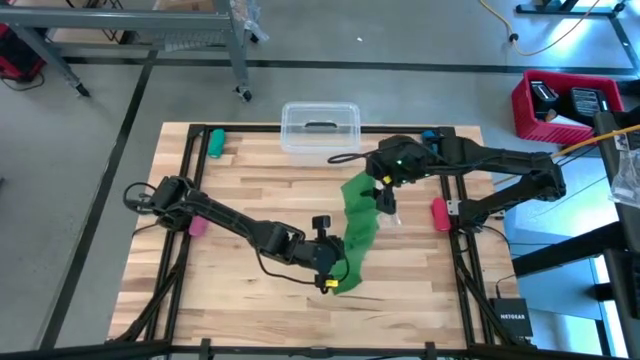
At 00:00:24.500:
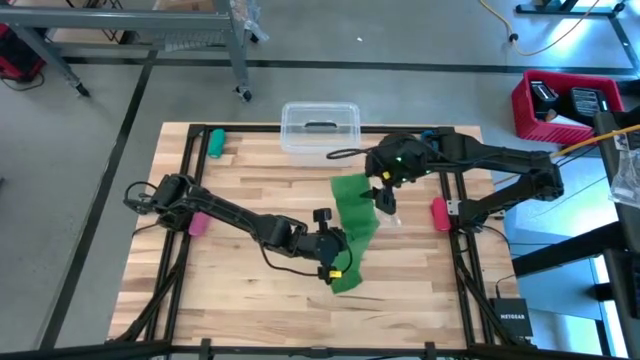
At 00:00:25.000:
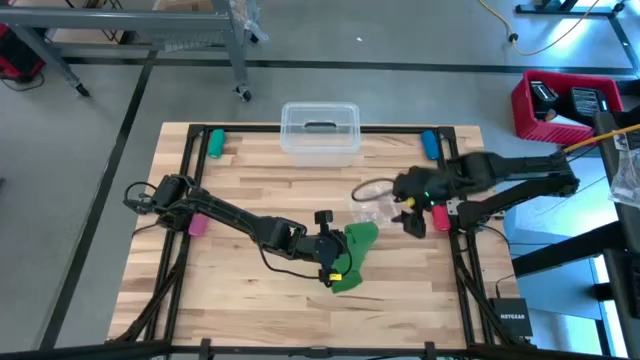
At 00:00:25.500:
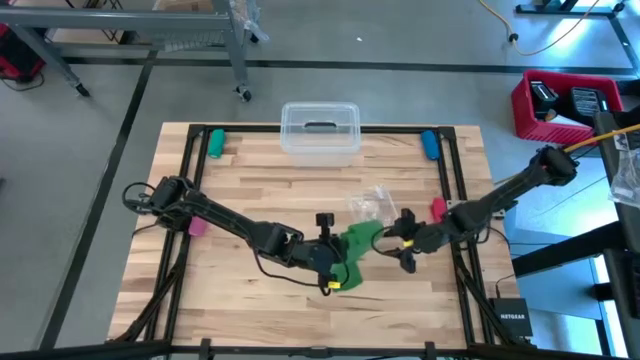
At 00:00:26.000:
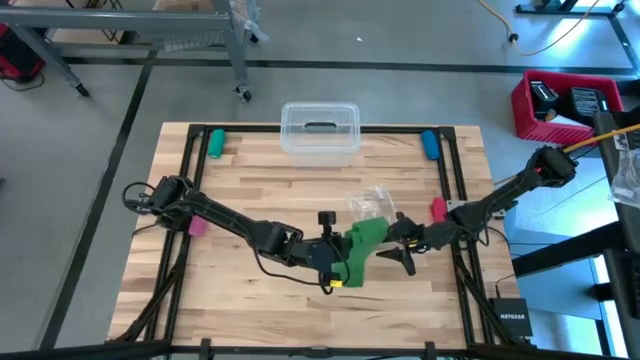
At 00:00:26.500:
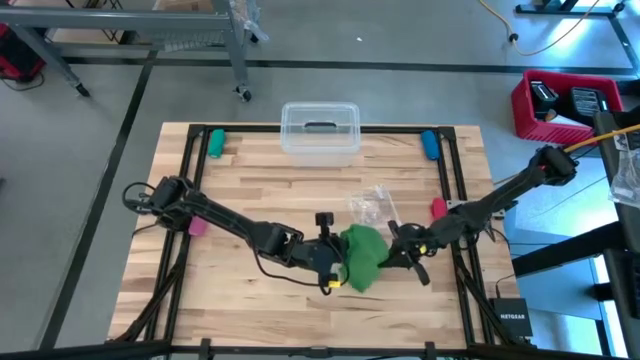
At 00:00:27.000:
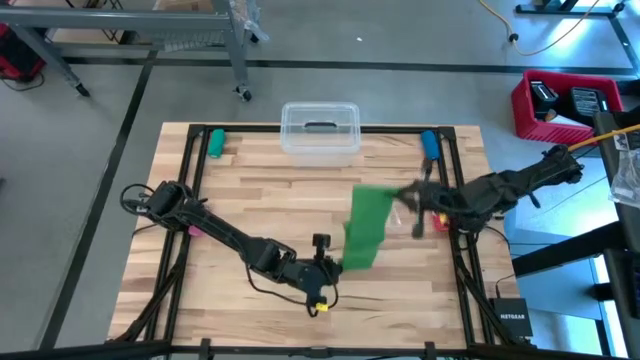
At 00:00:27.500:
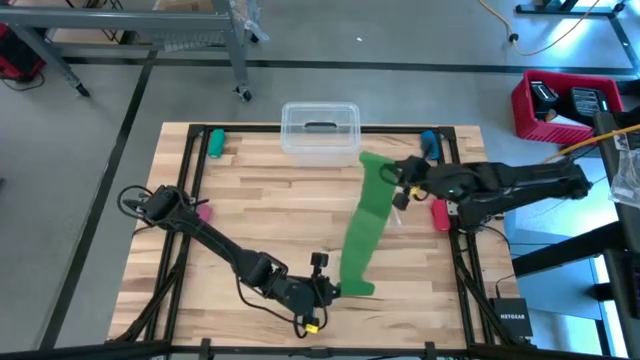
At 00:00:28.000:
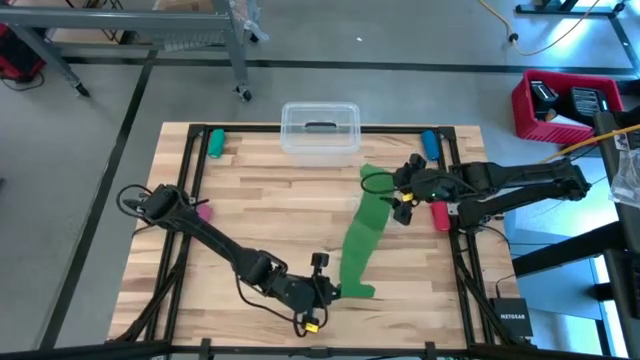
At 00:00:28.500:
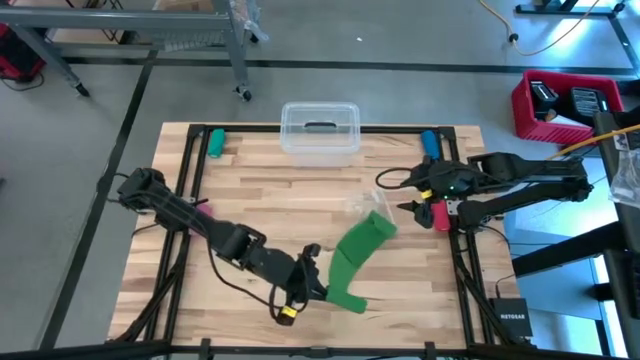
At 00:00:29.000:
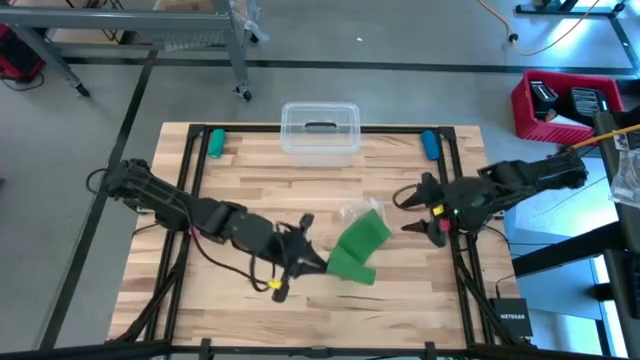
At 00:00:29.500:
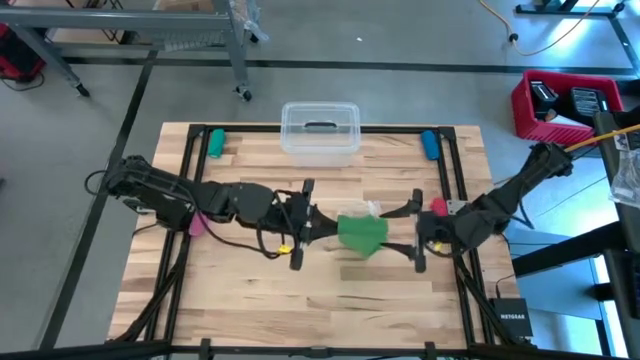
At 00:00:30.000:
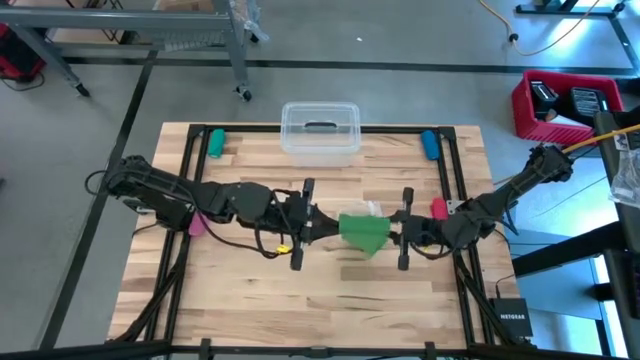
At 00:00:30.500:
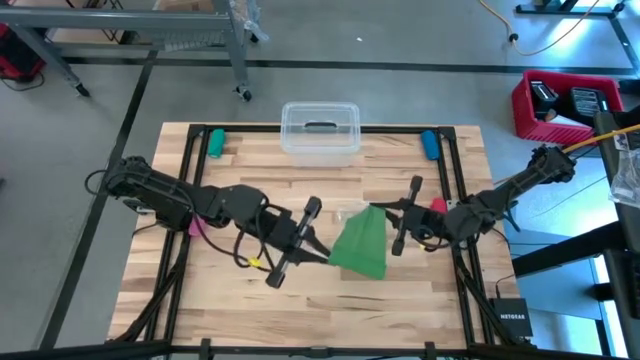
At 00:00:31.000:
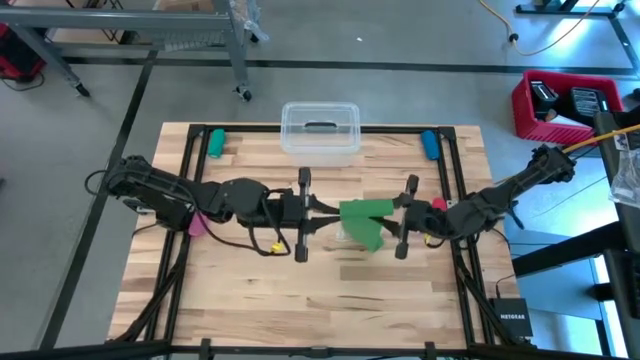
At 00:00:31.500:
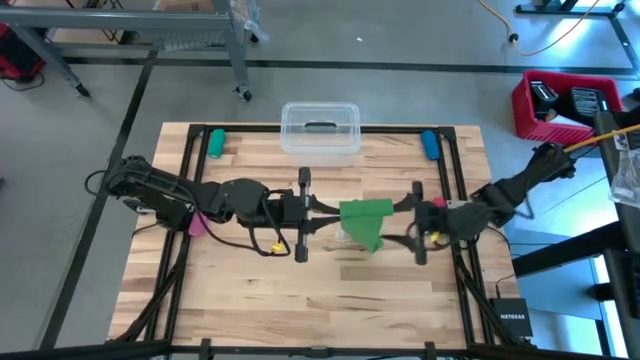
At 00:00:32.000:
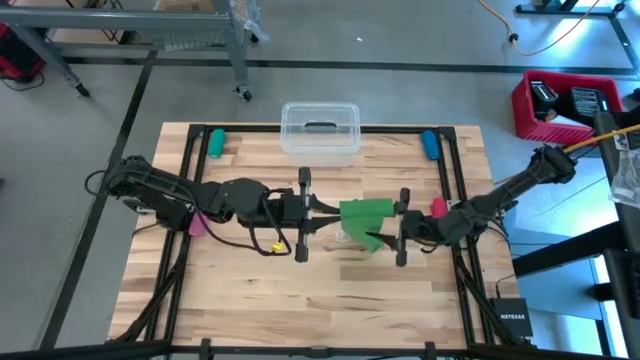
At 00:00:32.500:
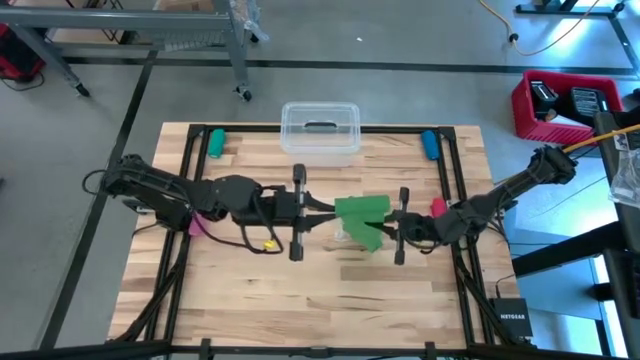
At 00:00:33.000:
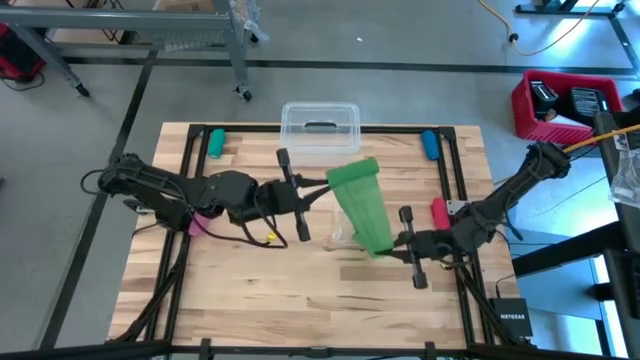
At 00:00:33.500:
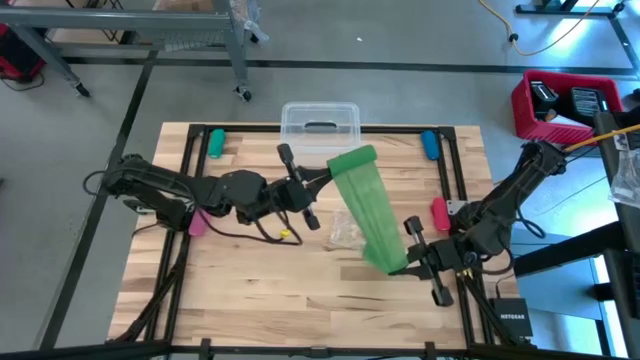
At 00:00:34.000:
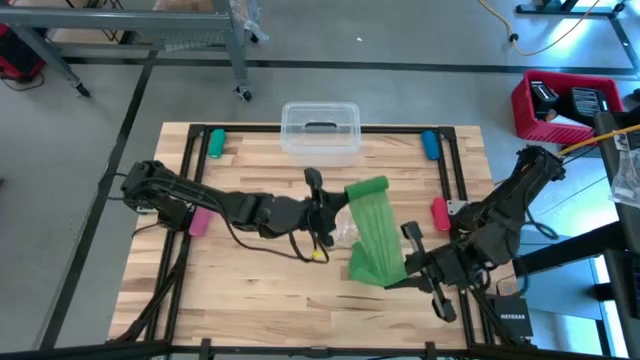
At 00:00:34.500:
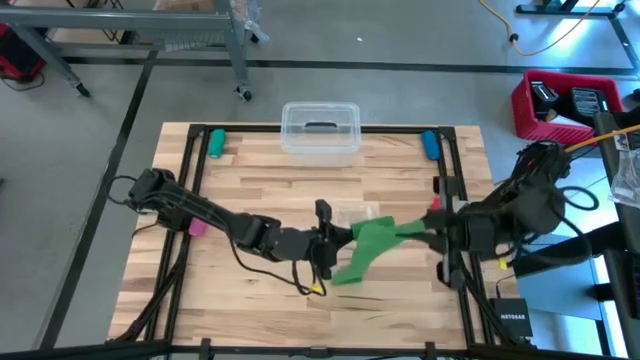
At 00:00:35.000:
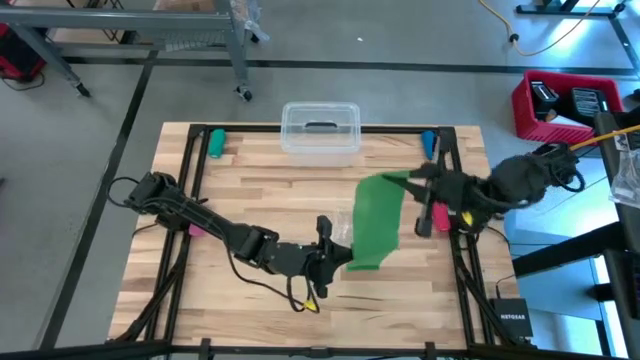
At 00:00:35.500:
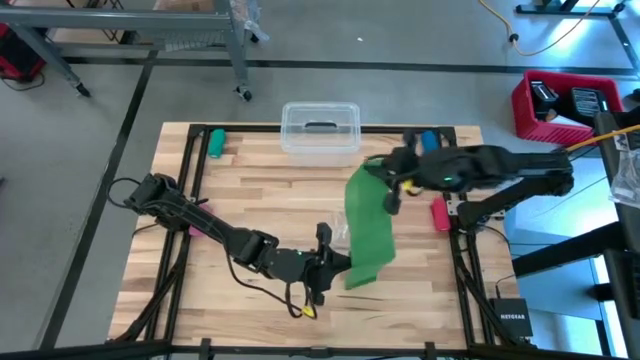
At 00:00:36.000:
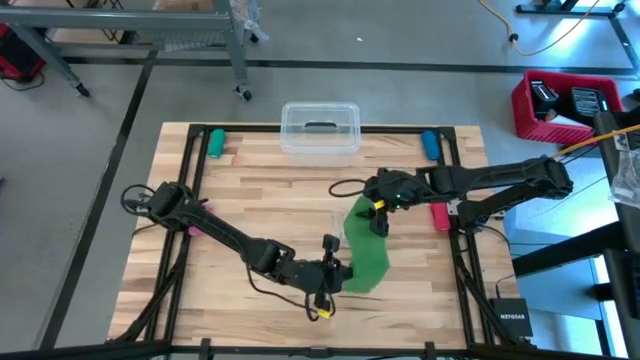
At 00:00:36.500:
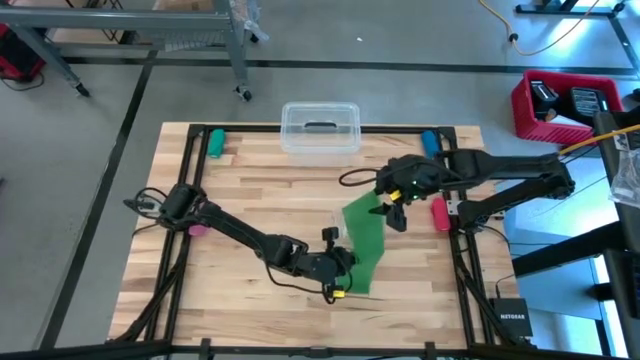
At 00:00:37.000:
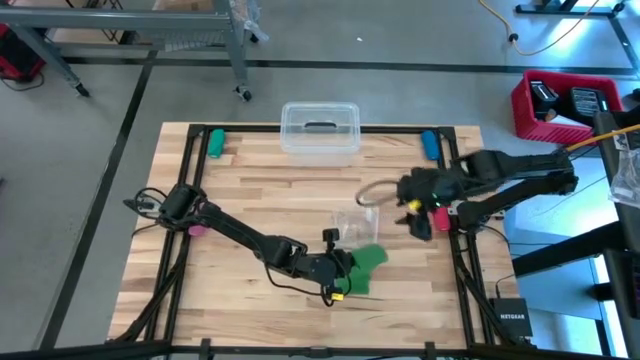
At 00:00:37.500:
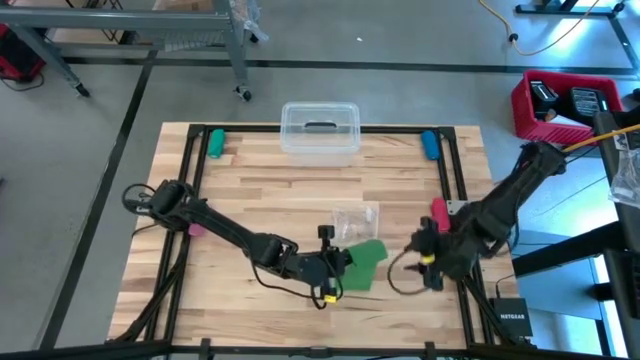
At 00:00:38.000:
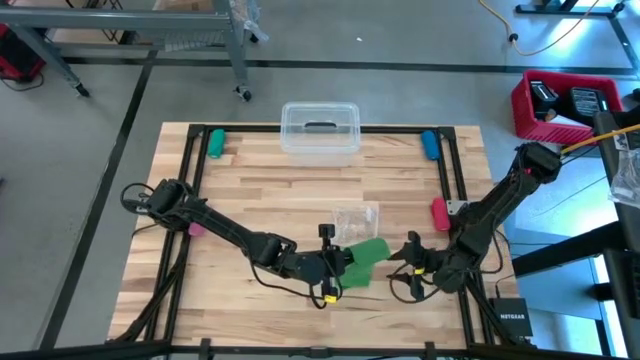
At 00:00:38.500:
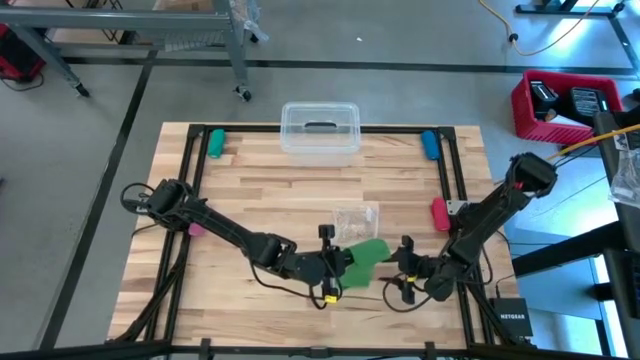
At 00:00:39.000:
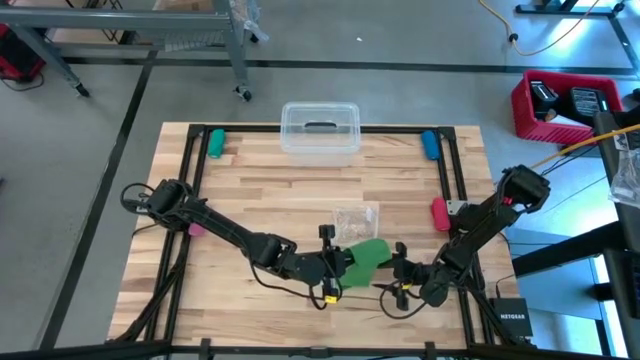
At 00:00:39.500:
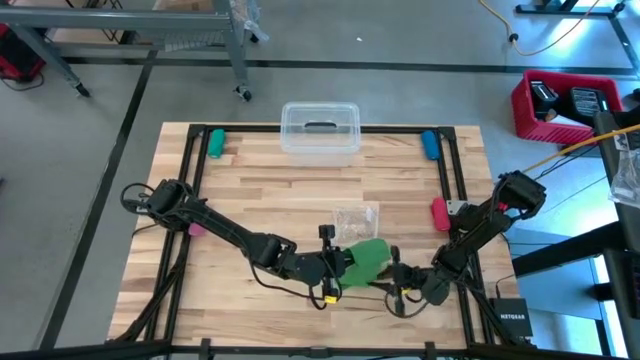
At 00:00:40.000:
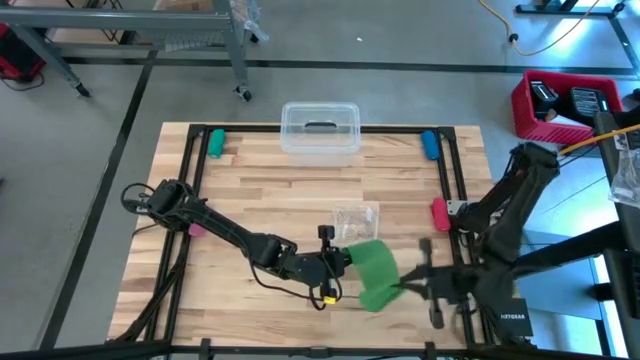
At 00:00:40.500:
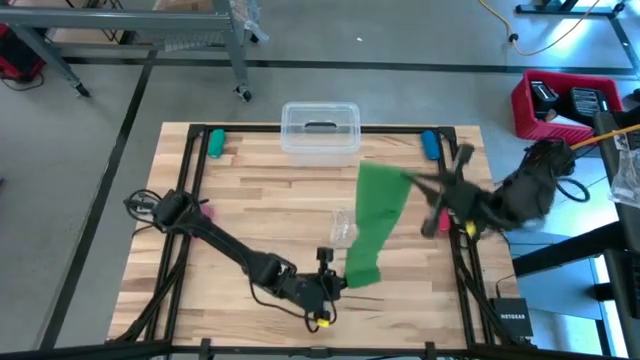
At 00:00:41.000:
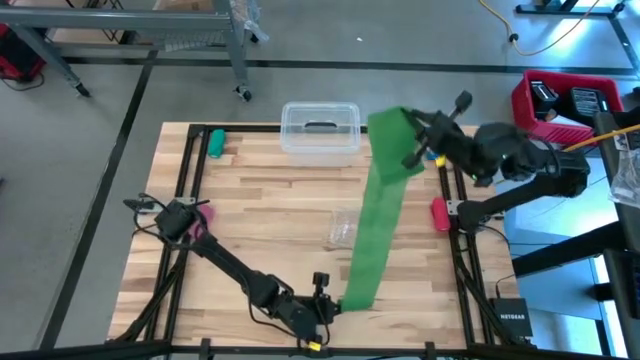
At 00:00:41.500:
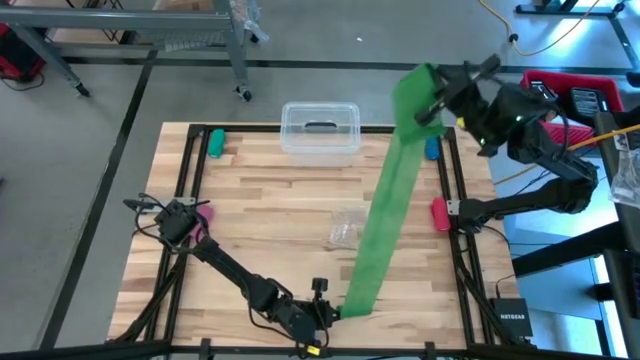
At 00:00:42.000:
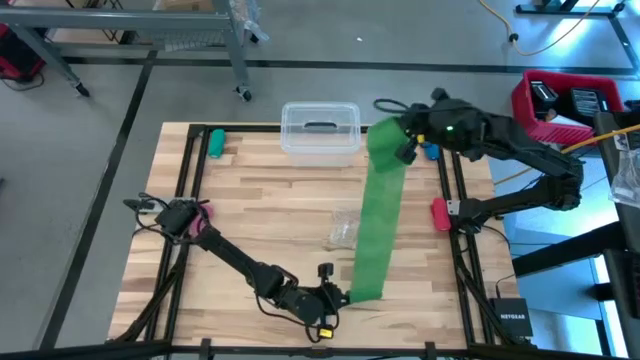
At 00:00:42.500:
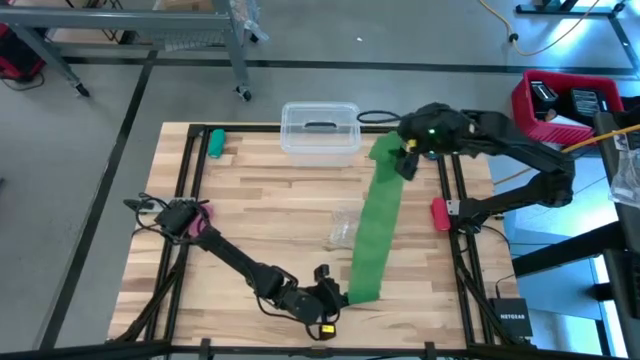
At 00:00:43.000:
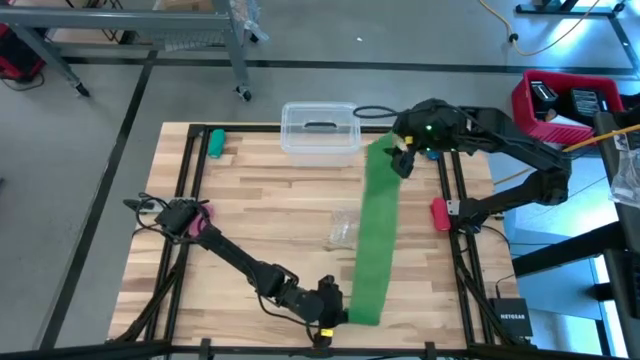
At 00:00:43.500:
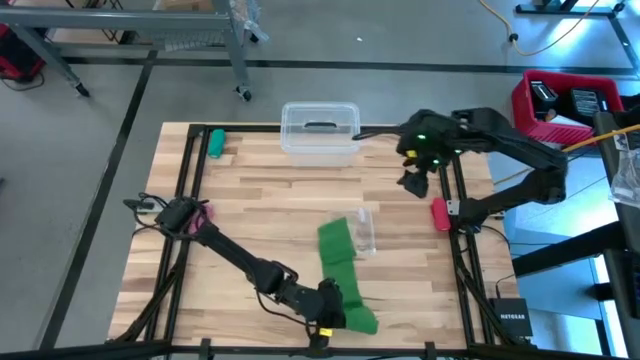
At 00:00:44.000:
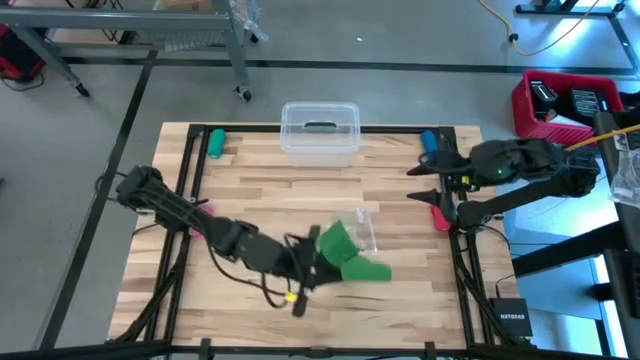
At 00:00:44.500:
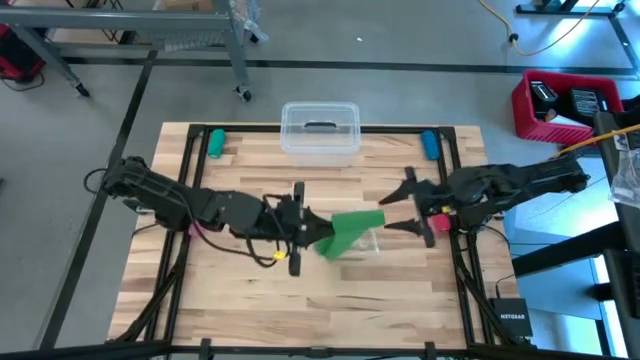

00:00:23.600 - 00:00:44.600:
Task: Roll bandage
Roll the green bandage
